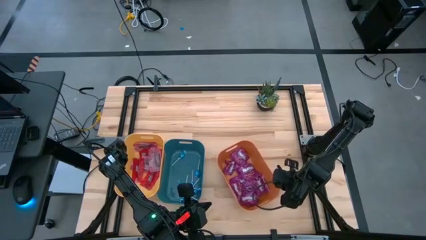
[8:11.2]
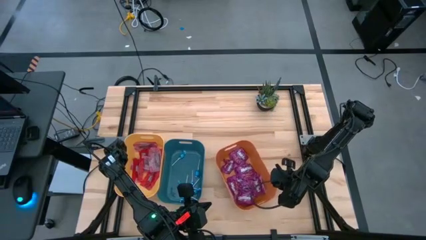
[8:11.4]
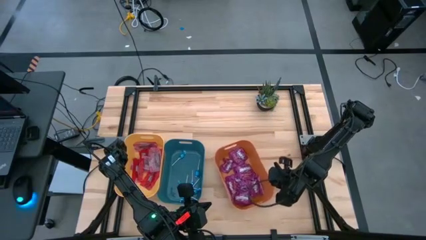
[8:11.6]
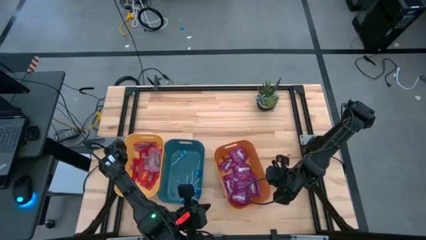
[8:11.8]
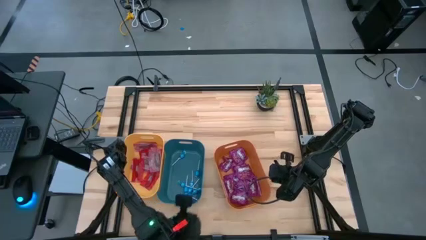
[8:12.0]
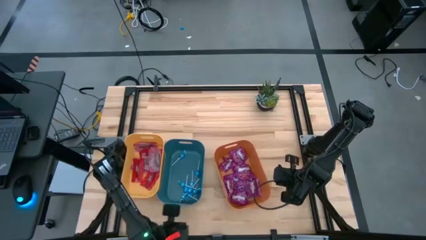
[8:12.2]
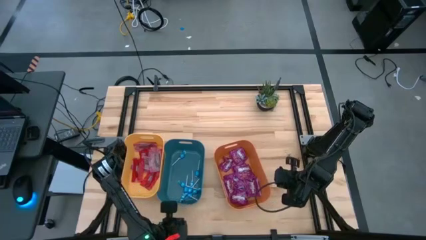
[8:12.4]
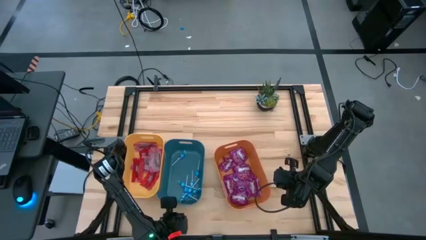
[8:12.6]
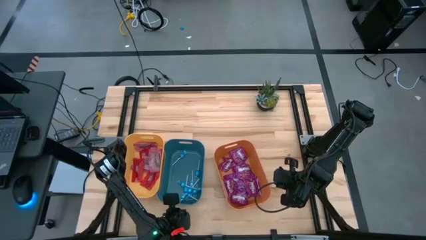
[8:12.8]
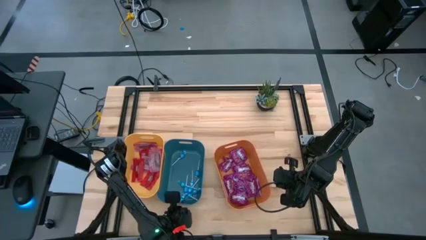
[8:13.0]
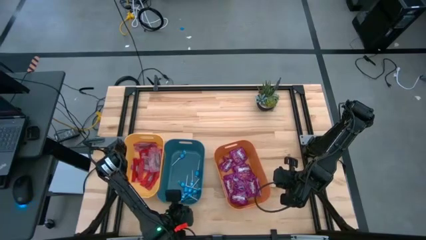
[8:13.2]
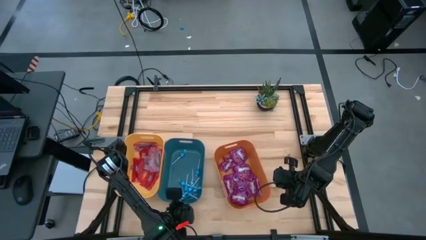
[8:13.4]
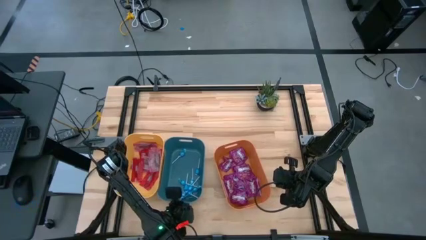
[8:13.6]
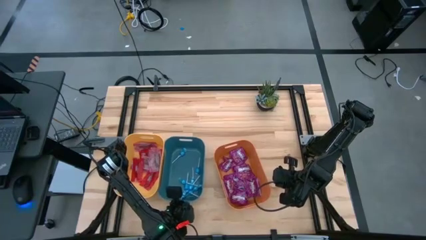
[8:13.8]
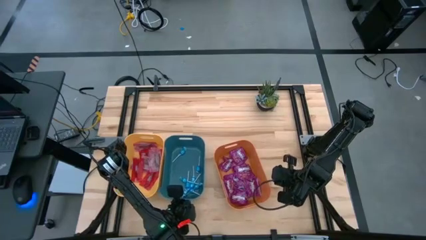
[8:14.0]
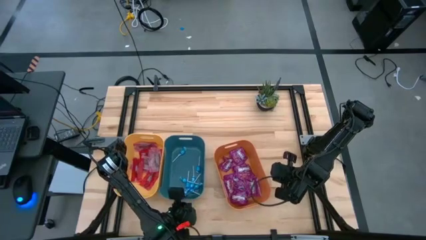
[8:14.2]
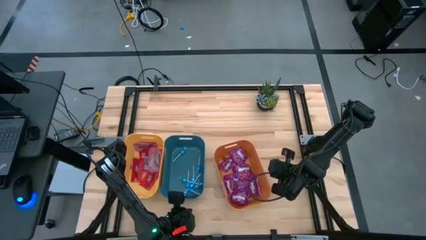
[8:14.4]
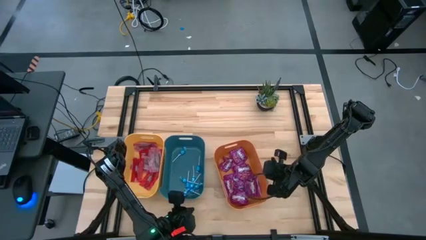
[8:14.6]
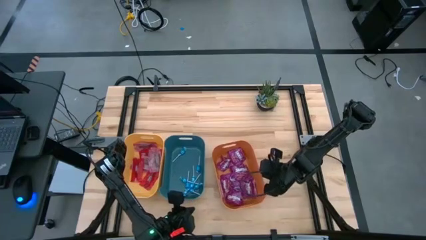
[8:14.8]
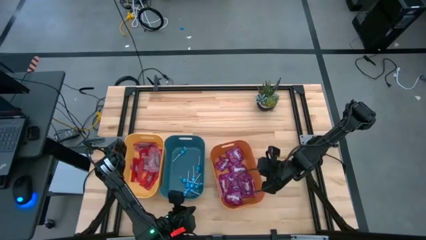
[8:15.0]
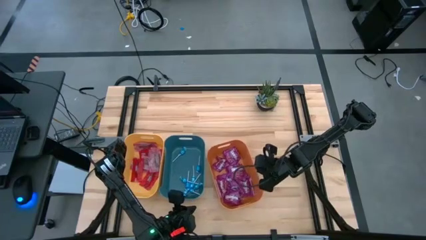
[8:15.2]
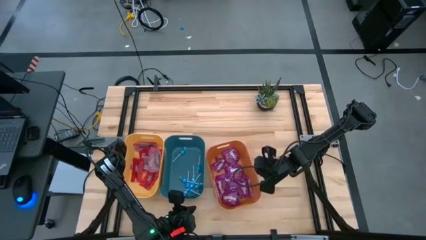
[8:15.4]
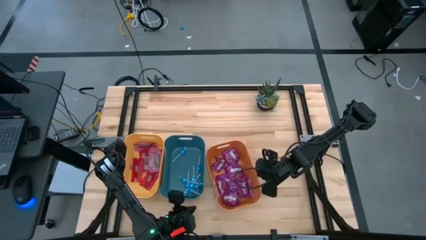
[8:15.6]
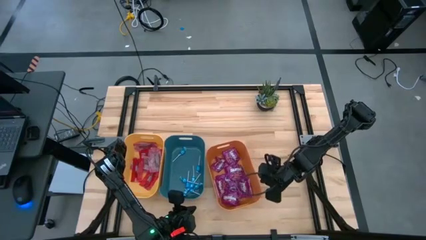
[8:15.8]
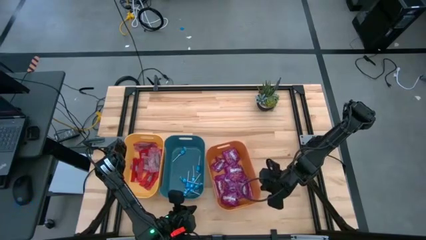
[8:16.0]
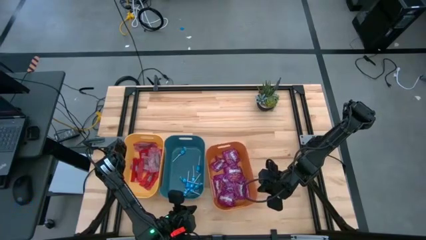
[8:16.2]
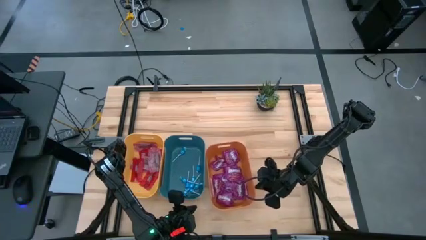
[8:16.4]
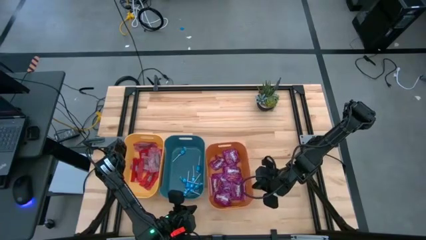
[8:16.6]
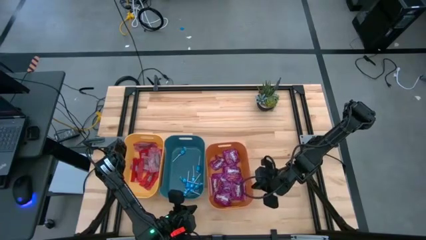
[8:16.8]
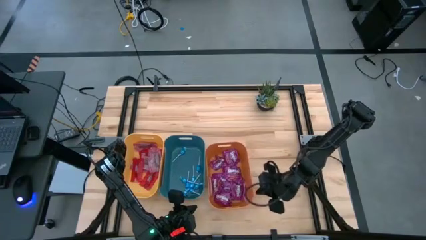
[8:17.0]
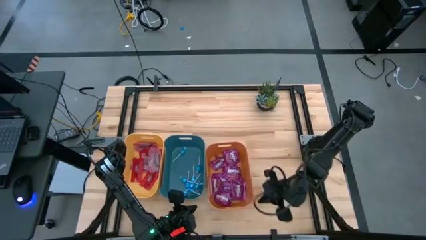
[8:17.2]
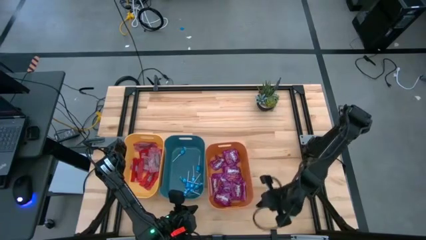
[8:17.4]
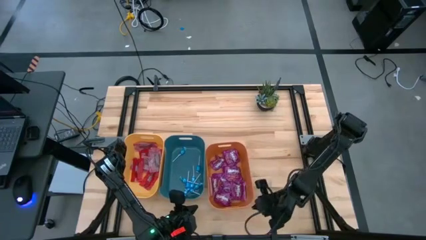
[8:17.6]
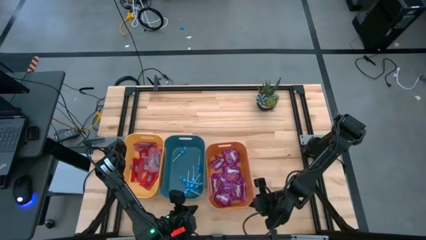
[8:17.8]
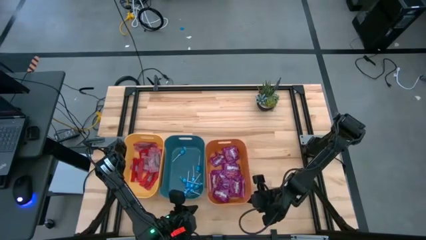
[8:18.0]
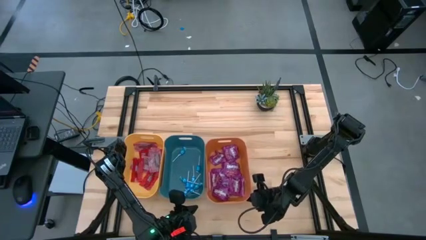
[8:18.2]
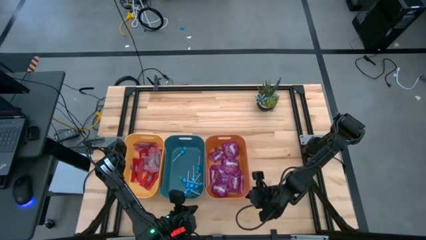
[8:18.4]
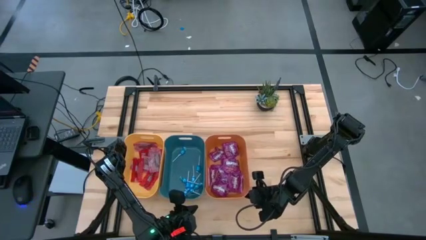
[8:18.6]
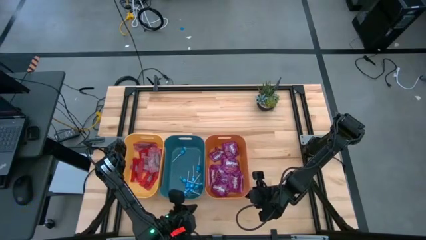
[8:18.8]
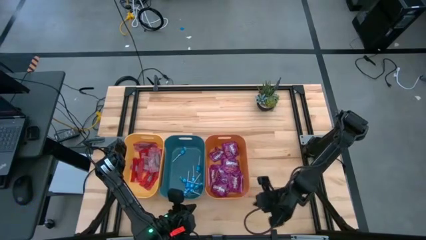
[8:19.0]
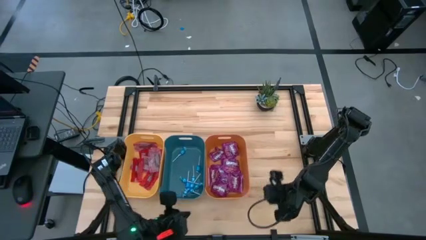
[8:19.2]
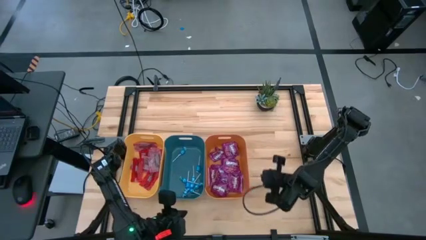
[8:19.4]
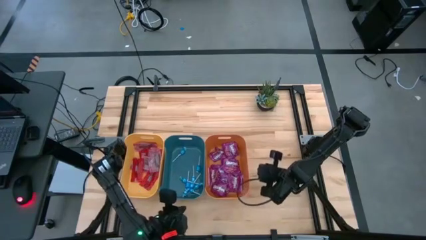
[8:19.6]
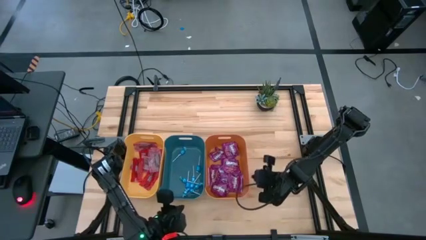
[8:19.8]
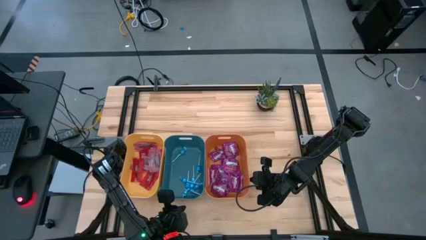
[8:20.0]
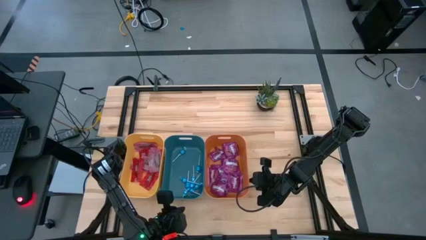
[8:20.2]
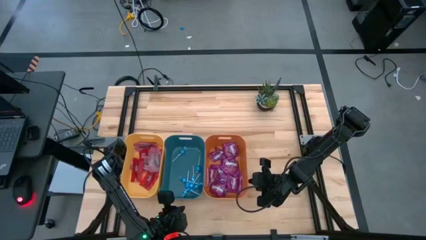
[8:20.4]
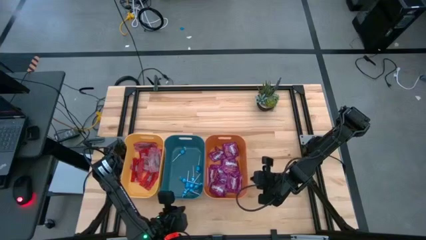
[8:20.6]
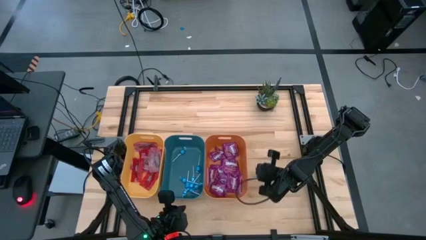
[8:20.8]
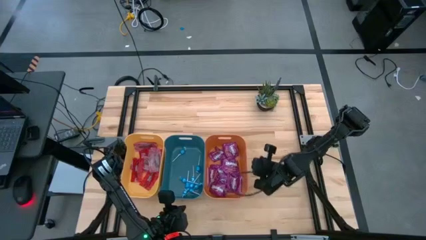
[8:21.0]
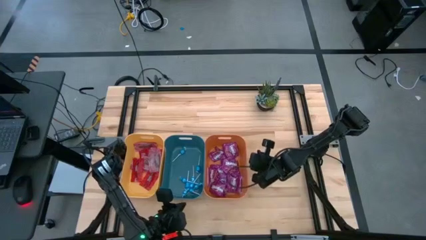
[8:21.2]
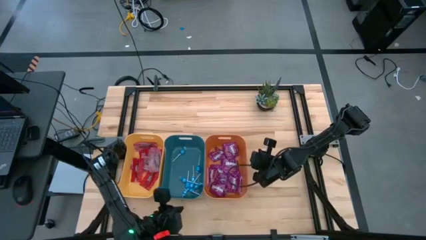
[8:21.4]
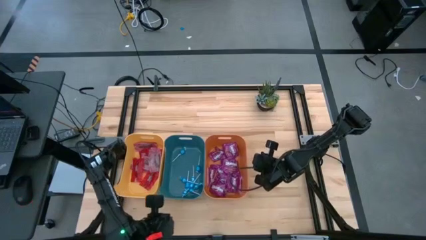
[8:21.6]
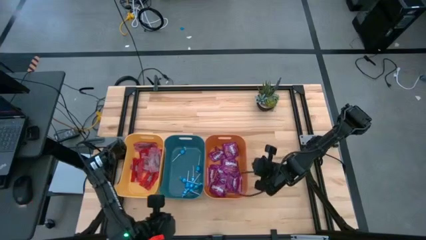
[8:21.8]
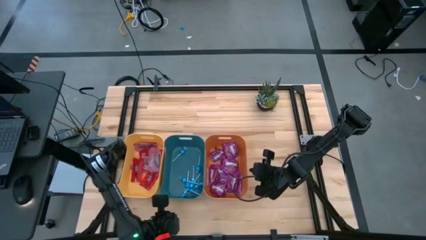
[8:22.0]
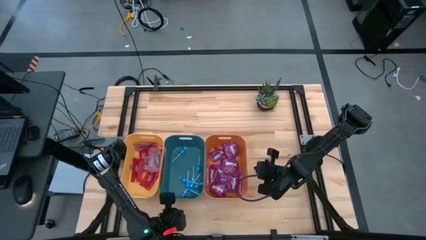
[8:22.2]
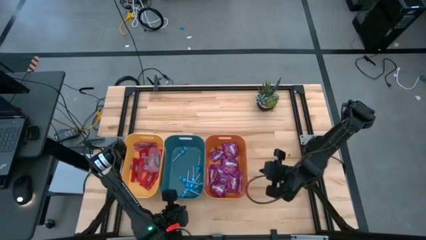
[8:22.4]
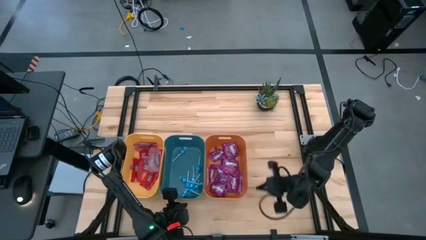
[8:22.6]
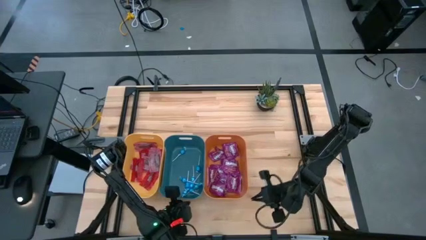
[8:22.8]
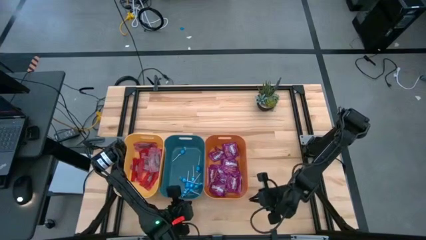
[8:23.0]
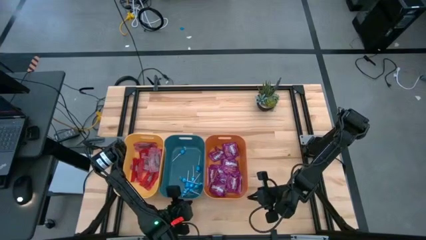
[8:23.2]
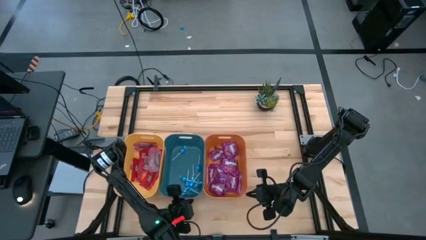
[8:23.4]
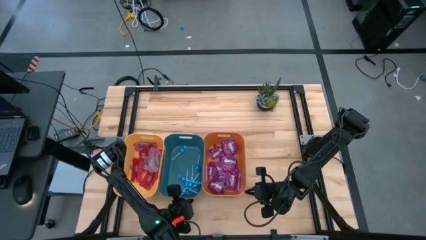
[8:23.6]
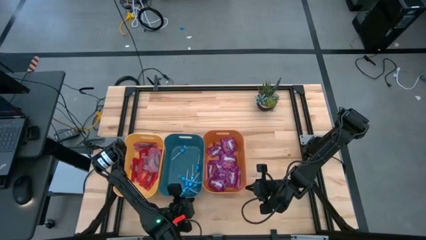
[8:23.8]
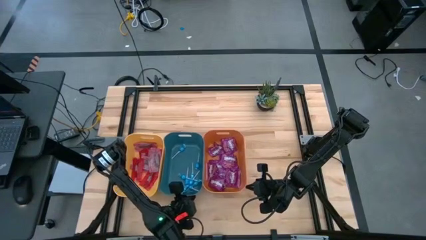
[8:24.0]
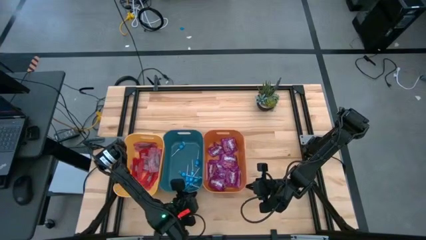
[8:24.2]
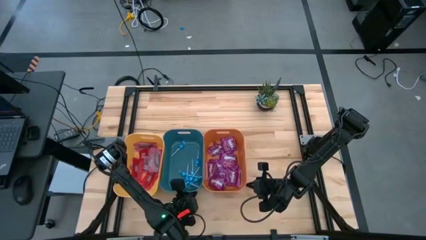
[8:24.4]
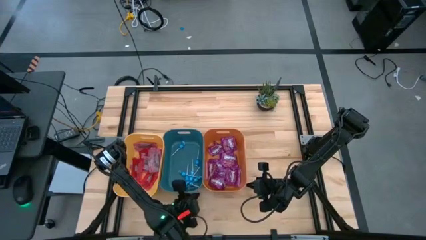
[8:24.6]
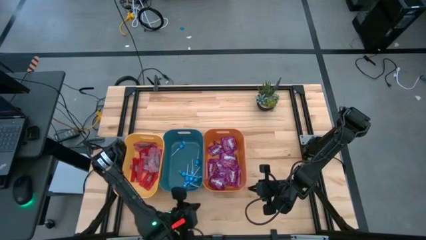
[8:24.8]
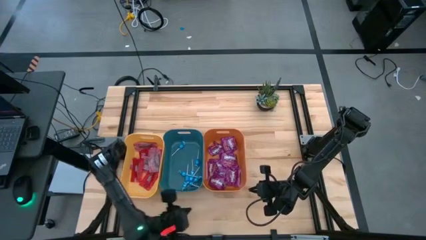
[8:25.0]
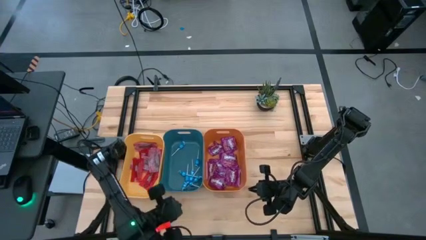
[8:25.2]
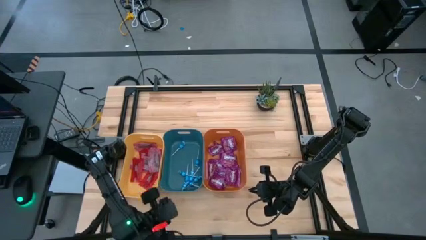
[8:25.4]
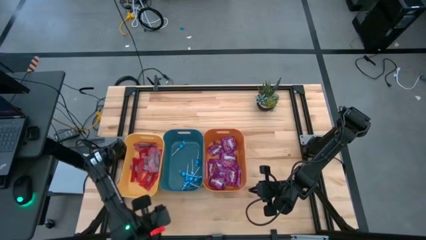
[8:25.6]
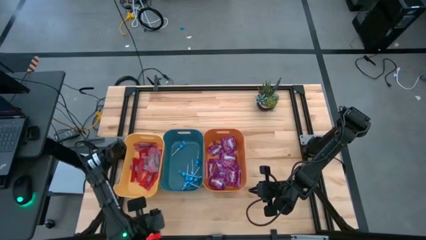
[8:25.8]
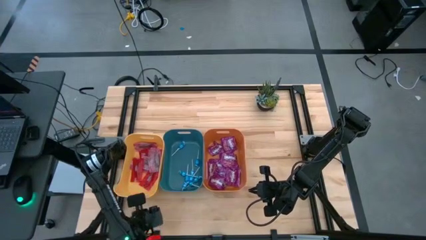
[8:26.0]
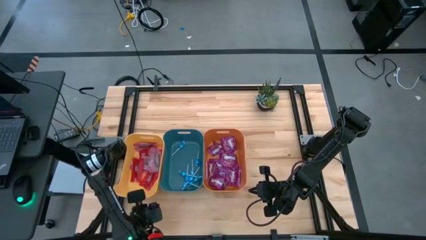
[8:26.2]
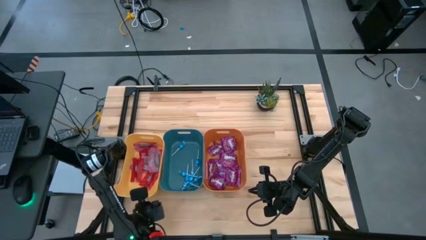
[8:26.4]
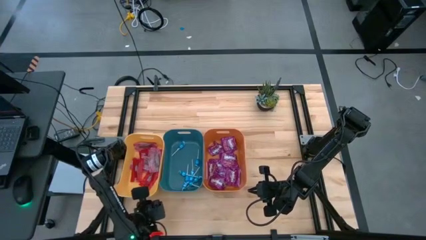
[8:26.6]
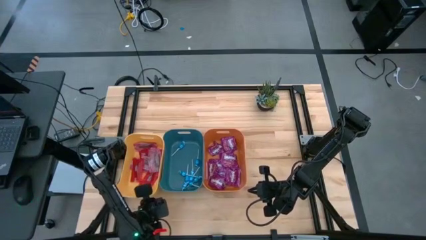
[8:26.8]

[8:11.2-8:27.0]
Task: Sort candy
Adjust the colored bins
